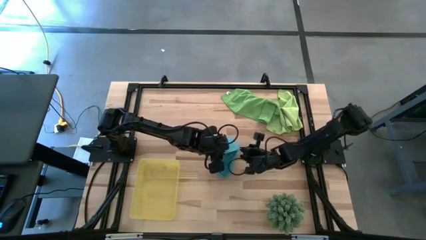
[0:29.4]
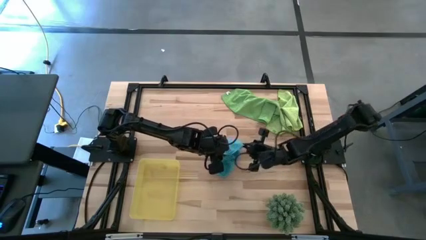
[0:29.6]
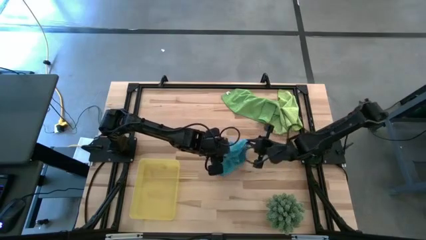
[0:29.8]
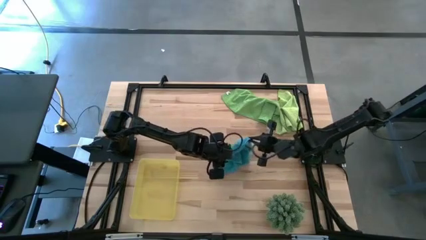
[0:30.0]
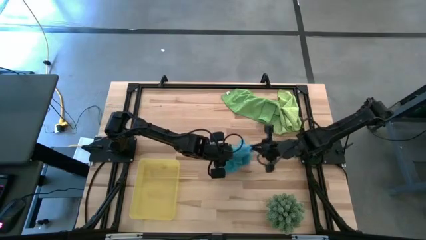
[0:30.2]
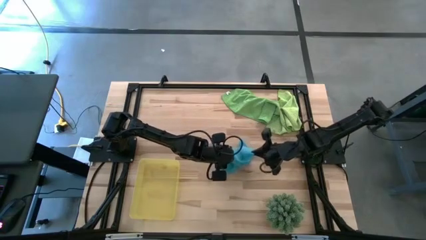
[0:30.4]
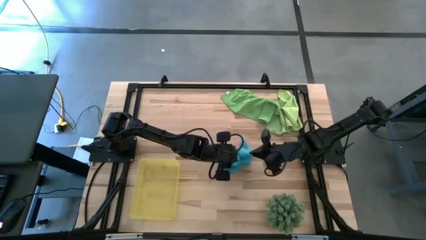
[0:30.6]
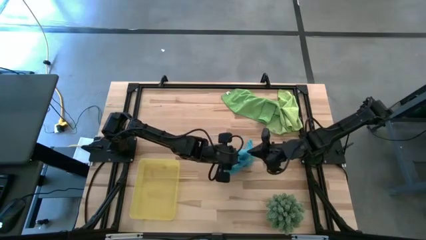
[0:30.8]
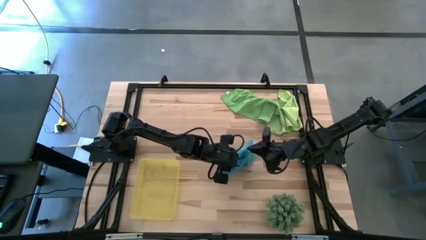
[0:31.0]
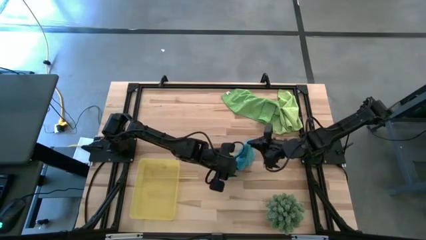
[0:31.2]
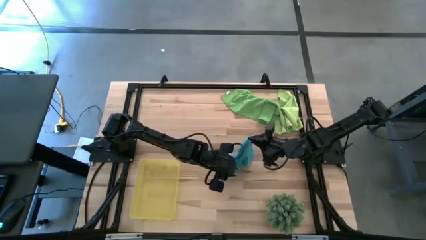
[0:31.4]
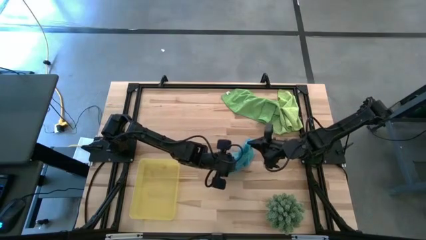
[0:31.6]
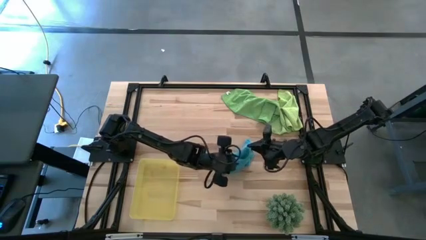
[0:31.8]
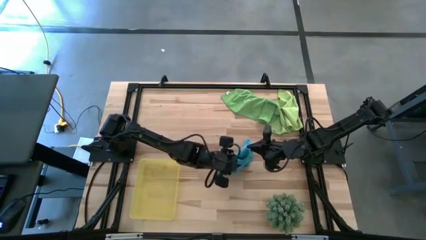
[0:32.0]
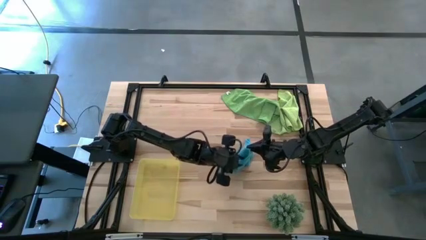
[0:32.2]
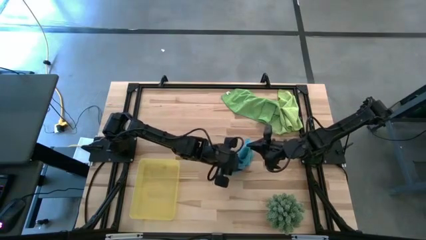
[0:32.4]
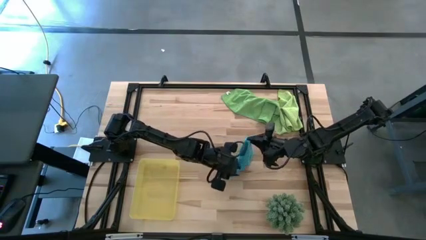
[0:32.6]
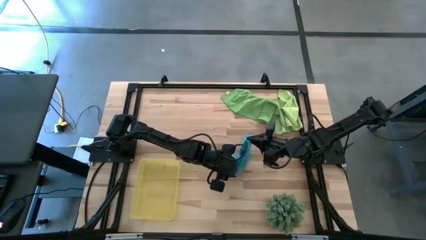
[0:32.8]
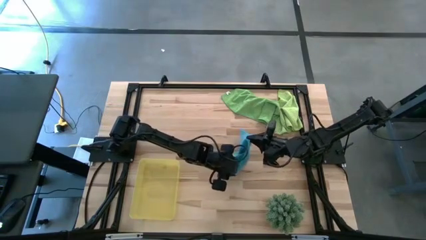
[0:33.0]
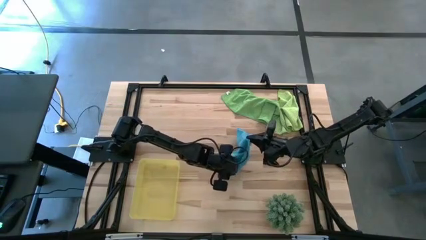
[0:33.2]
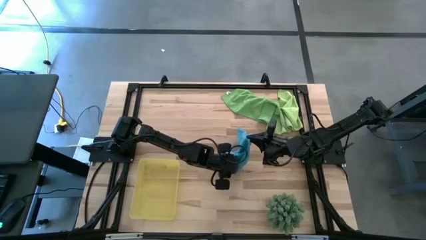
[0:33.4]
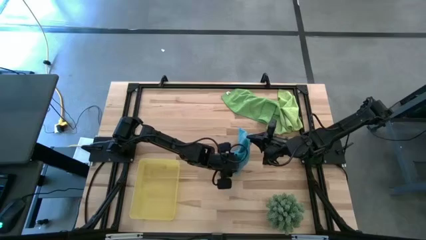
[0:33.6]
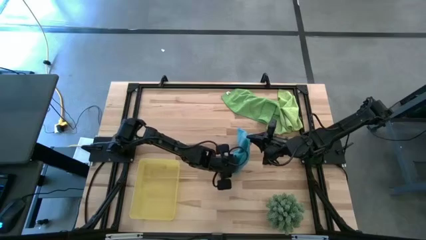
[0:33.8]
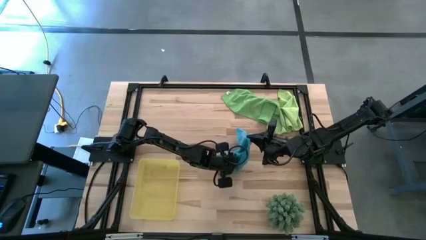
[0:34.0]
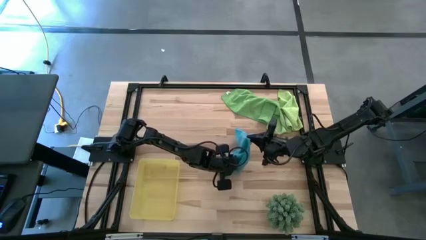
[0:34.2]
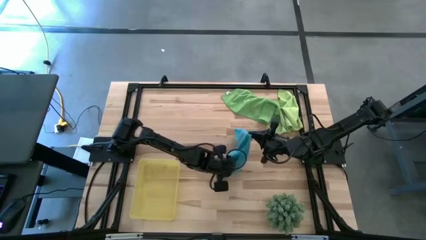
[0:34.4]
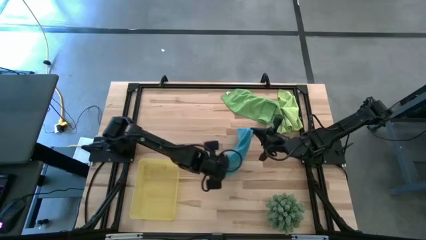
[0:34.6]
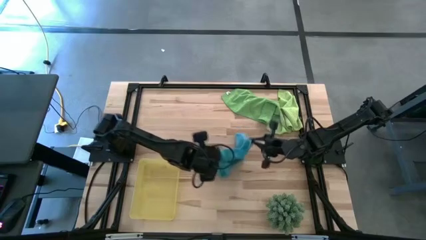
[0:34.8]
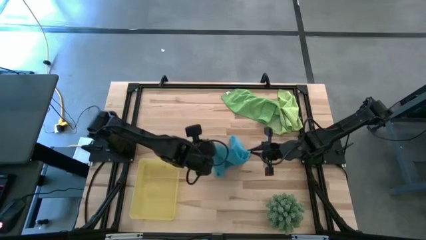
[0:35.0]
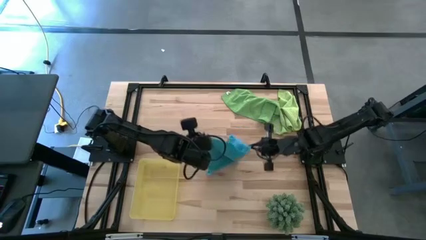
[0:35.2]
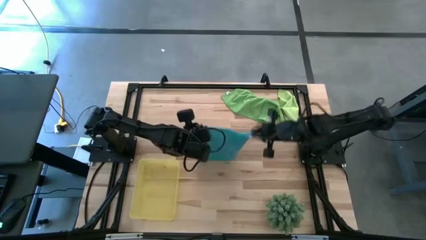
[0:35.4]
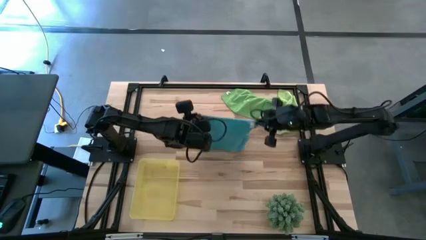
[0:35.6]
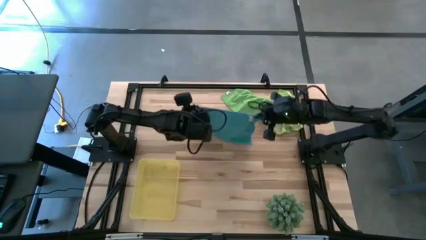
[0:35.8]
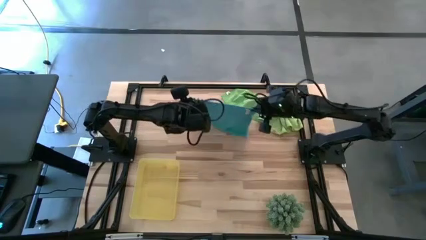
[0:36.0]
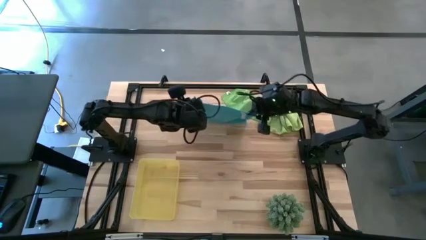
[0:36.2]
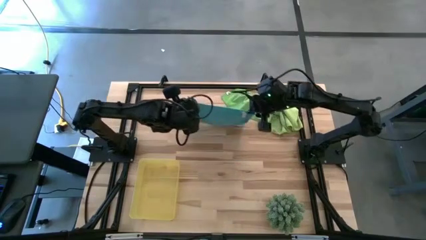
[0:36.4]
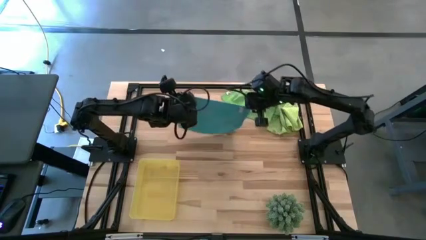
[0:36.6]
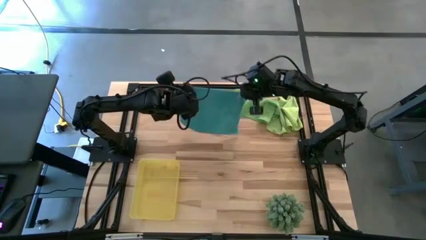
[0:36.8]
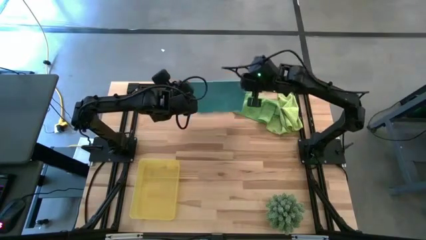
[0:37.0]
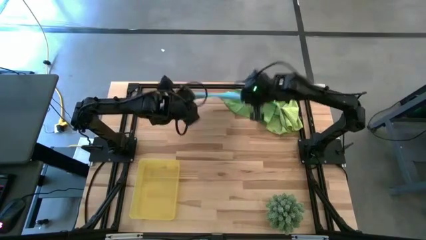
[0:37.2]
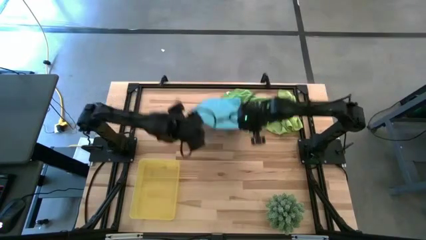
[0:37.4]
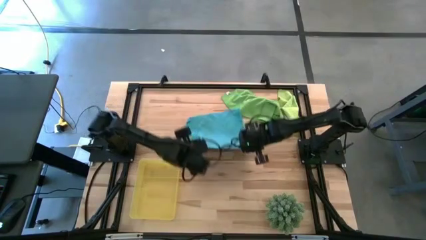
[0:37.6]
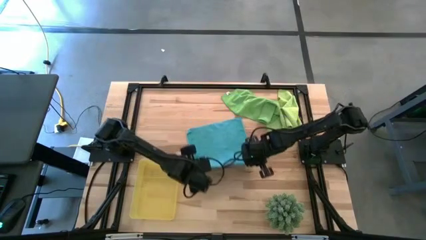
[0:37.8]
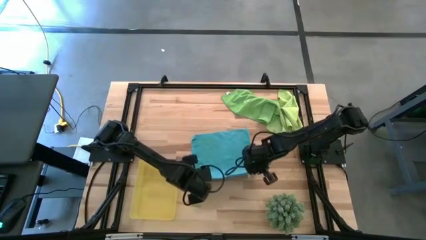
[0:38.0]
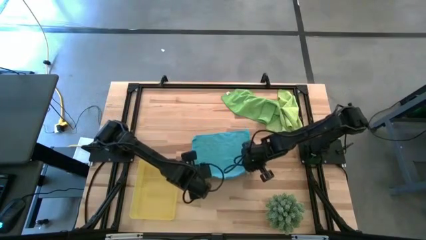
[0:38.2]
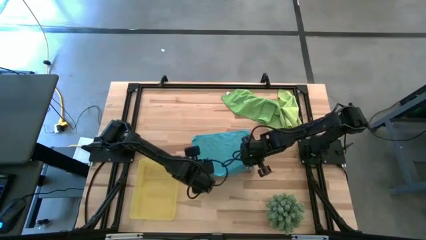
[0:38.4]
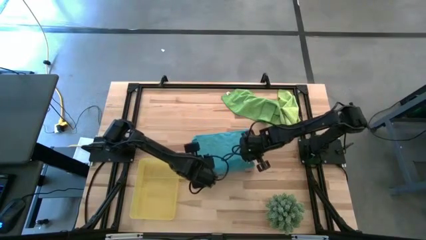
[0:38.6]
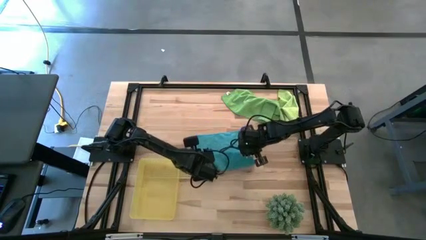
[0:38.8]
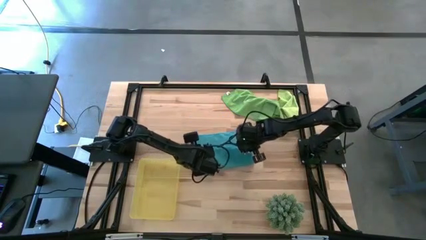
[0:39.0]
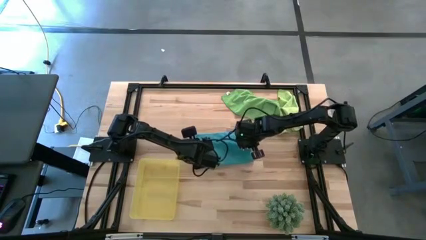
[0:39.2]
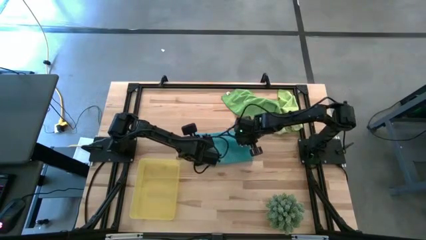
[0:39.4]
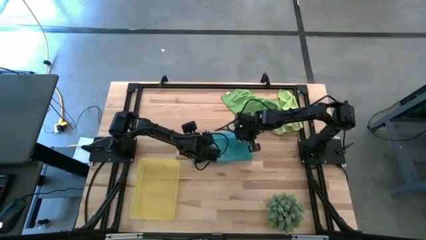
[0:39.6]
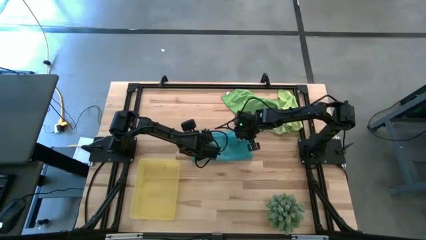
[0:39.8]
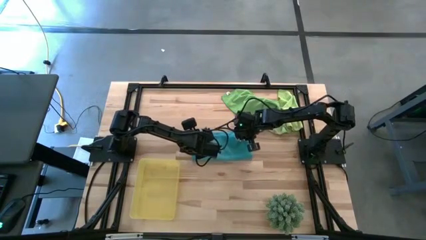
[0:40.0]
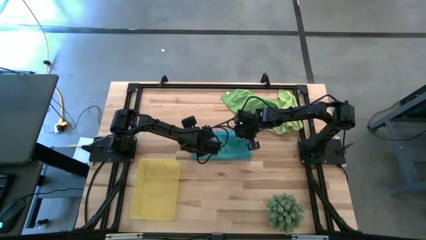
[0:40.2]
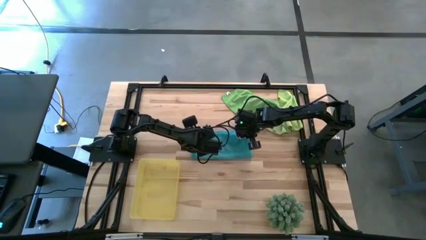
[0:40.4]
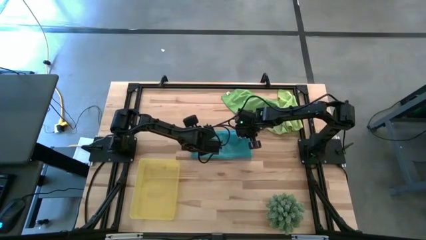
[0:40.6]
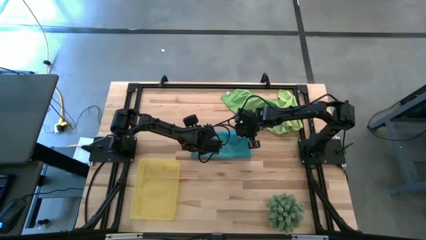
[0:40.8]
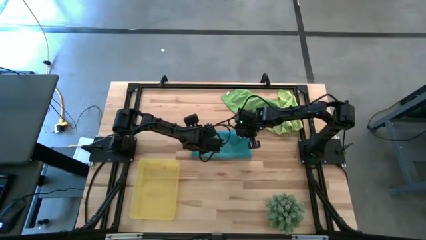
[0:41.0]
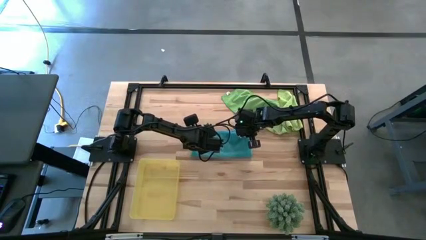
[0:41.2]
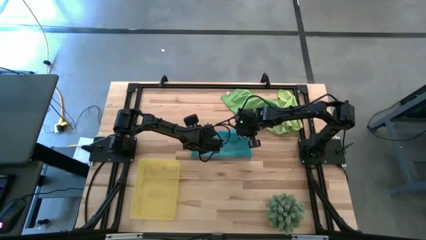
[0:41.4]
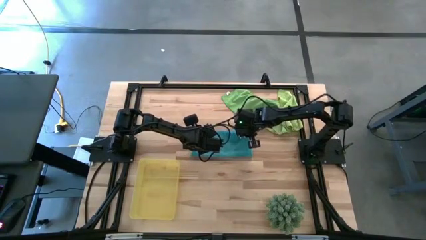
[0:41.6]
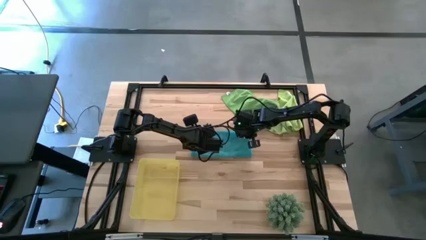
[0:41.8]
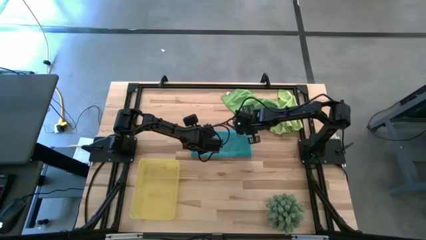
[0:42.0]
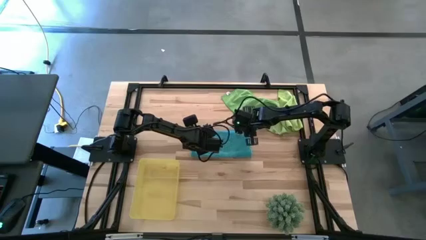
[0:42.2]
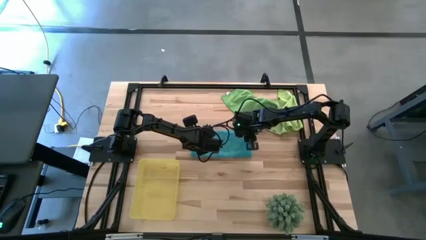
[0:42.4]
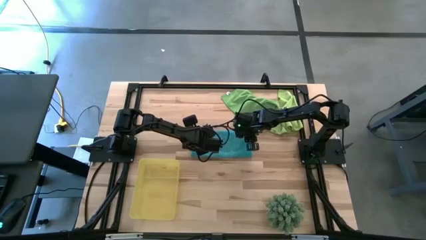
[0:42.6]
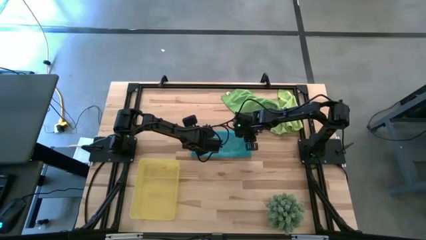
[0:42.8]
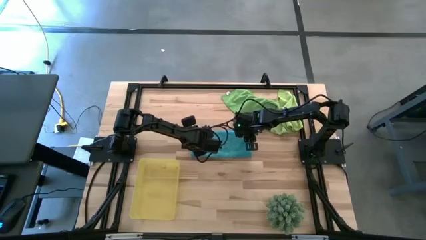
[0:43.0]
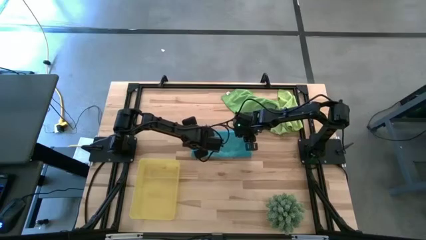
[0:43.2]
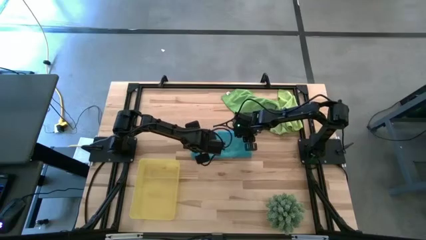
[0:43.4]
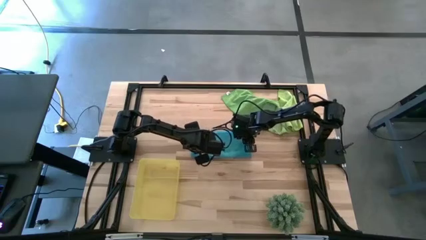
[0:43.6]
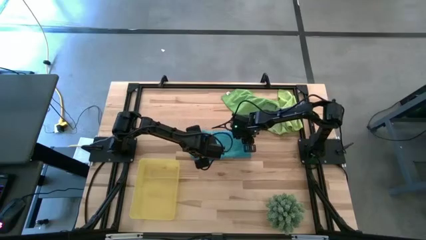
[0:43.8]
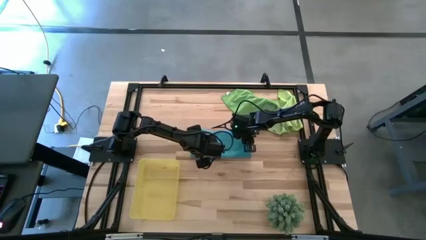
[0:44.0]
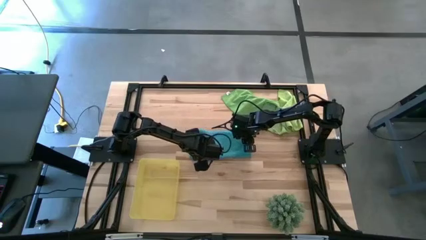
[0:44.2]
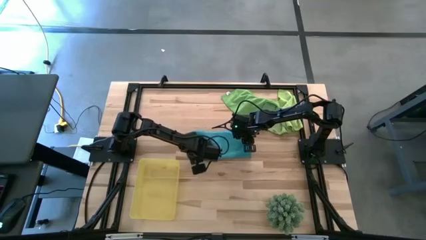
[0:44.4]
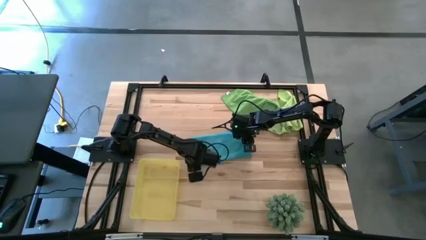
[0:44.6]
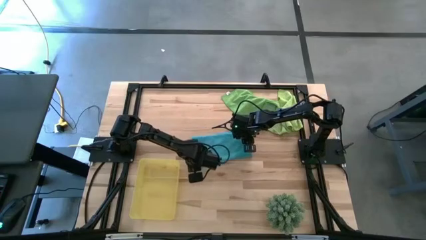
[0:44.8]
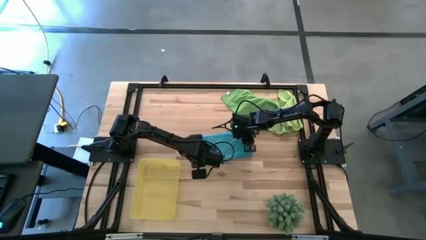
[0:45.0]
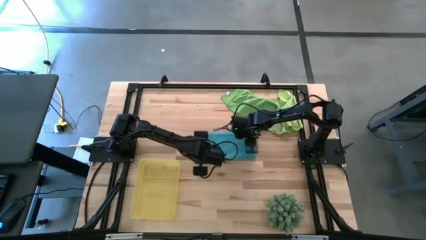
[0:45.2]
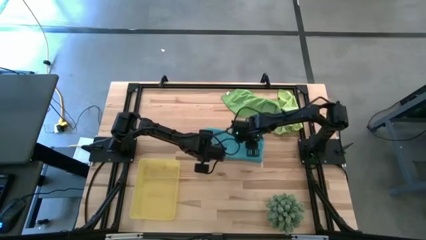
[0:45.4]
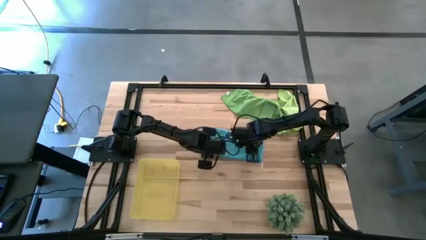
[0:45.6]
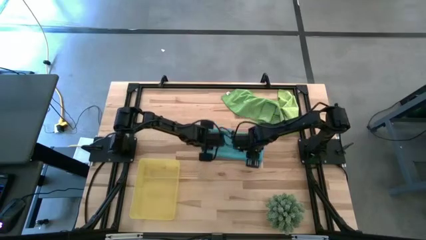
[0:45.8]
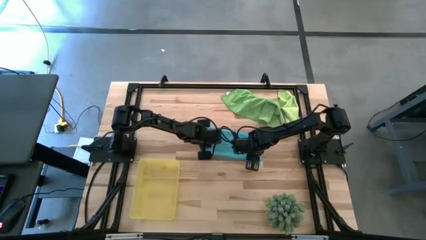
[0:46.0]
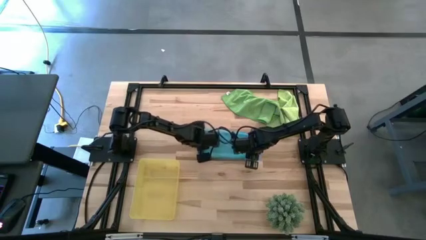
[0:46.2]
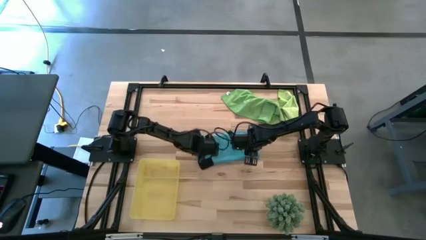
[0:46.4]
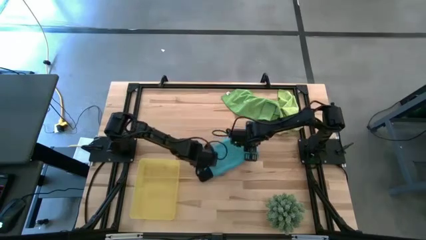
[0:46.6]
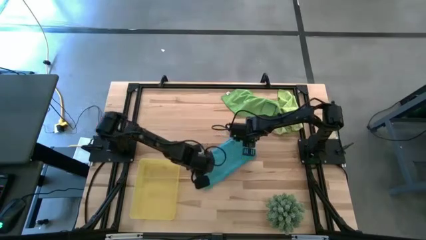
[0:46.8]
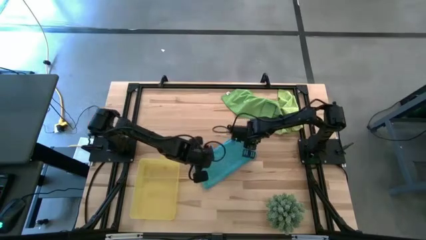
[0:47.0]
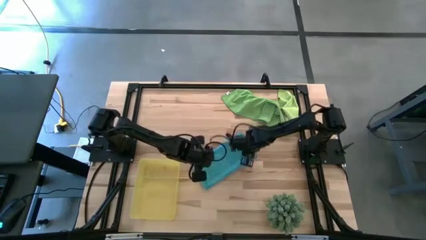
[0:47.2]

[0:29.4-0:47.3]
Task: Roll microfiber towels into tight, uniform cylinder then place into a basket
Roll the blue microfiber towel
